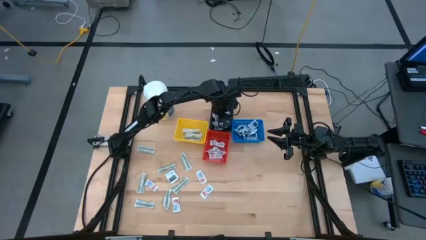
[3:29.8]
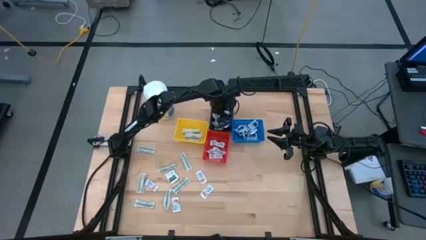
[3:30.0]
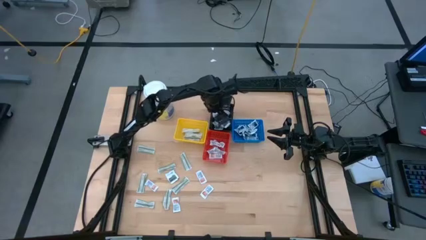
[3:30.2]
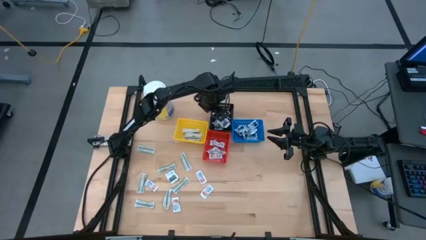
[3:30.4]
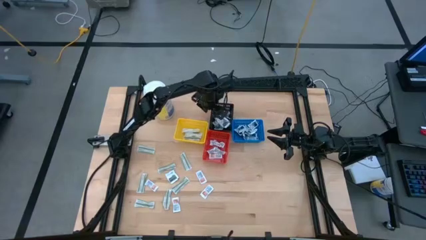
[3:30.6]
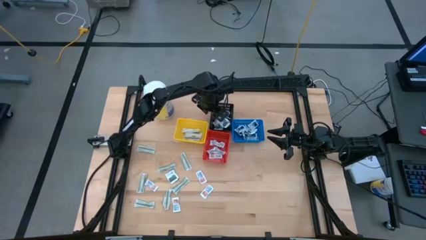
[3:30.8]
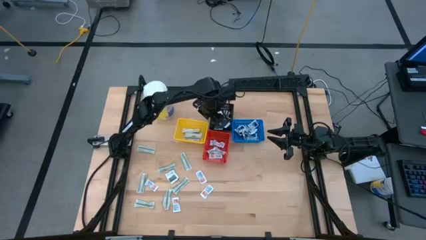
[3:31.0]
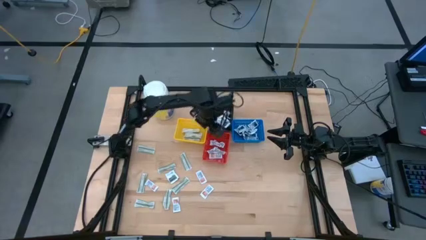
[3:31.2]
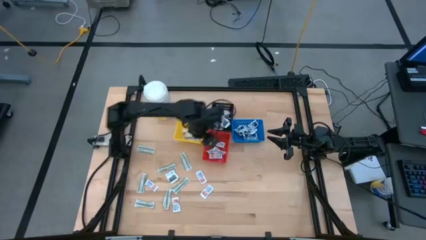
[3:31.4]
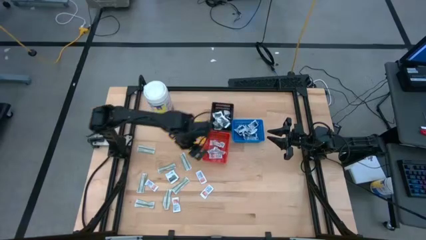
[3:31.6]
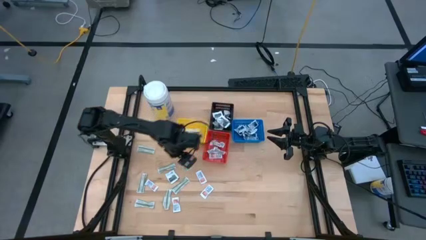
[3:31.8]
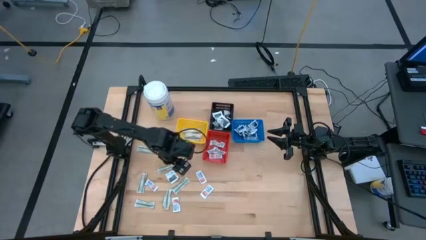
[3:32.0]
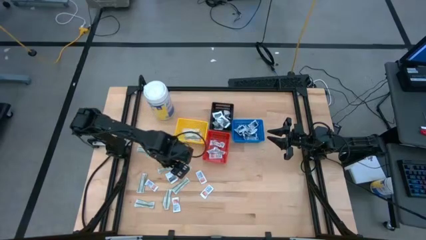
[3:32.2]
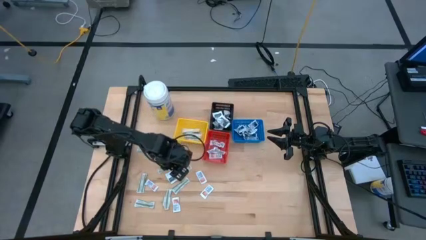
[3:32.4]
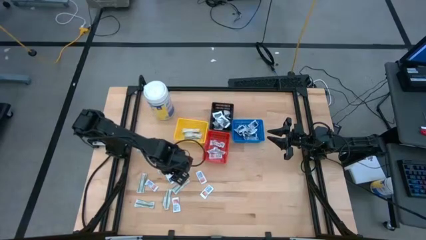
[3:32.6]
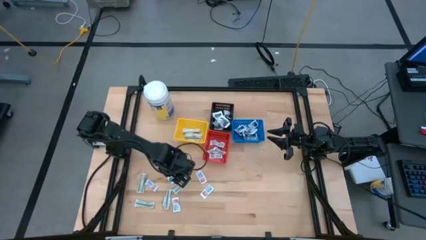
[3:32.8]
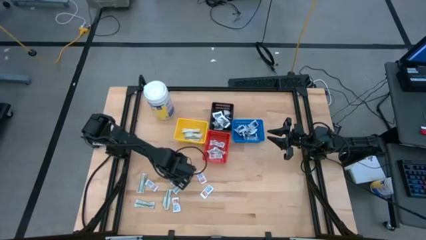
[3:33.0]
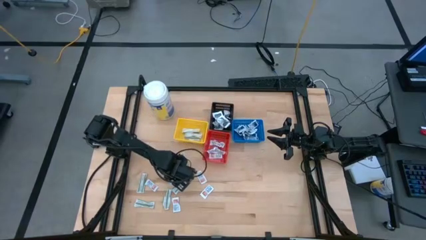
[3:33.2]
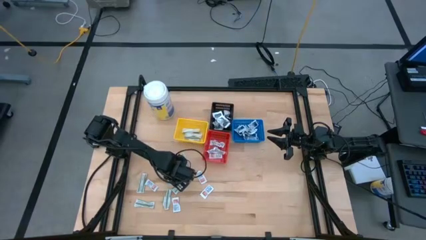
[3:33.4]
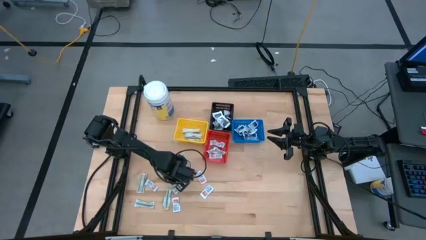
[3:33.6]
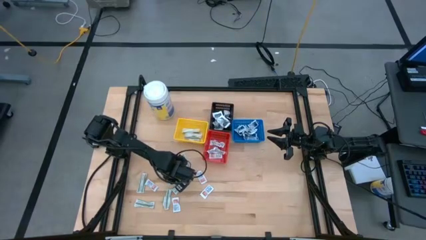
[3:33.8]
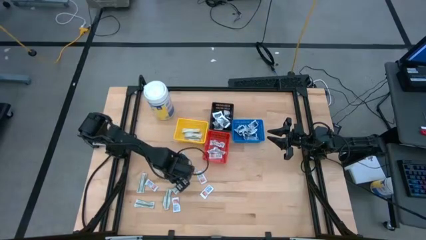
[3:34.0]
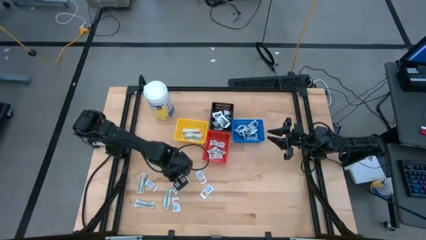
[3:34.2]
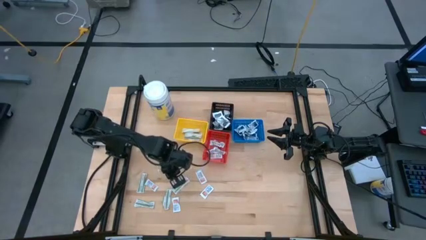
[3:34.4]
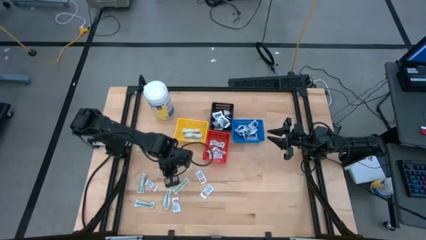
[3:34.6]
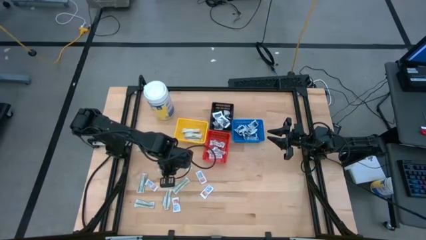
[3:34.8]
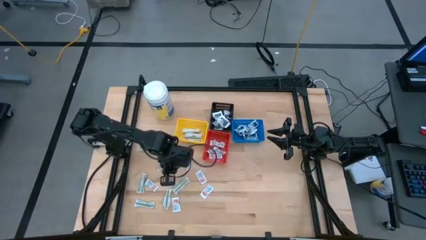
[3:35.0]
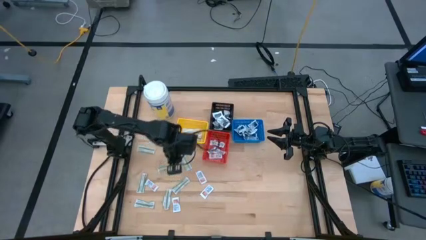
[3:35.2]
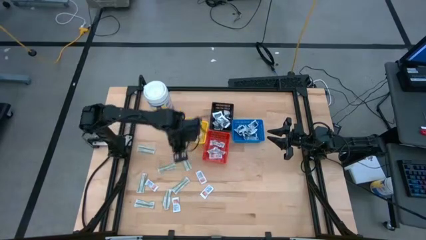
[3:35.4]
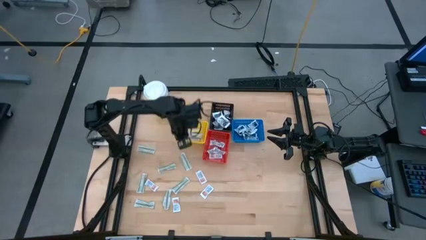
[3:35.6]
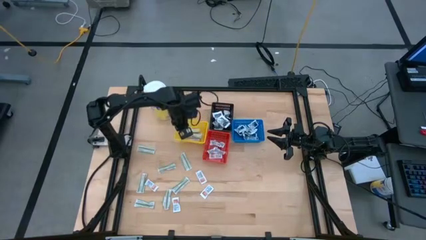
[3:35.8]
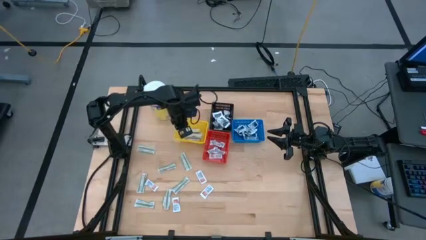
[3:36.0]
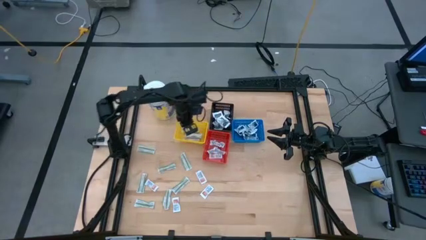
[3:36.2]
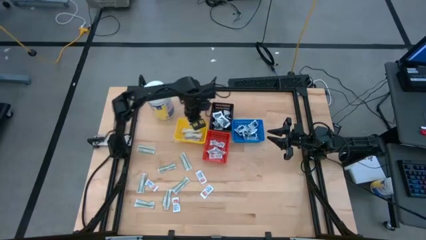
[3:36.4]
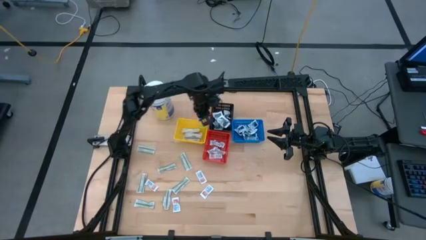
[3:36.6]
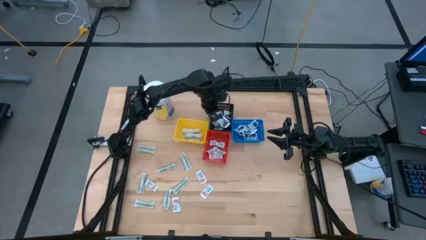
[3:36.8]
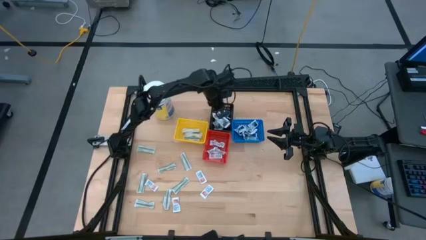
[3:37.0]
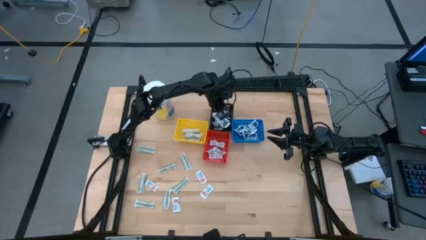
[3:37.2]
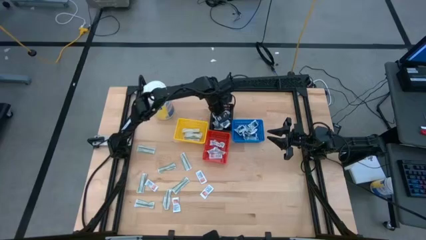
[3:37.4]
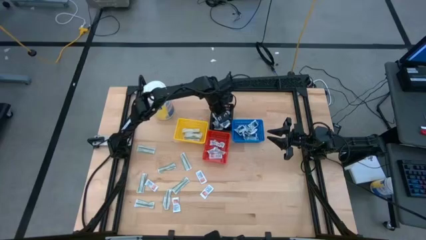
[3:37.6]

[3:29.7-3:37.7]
Task: Pick & Place First Aid Supplies
Put the towelette pack into the black bin

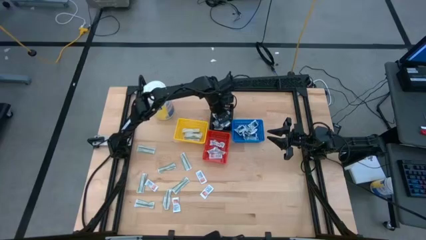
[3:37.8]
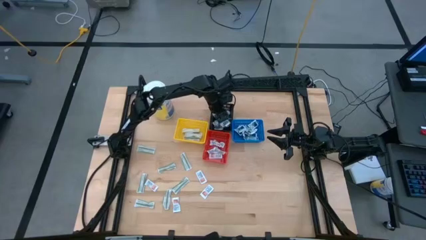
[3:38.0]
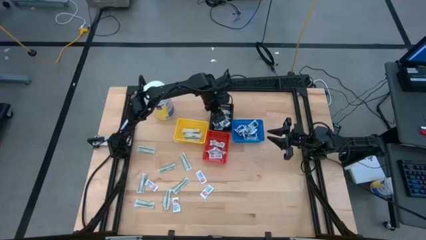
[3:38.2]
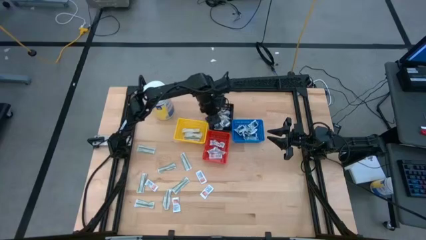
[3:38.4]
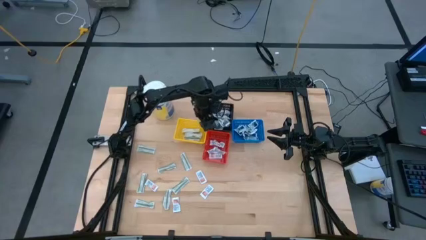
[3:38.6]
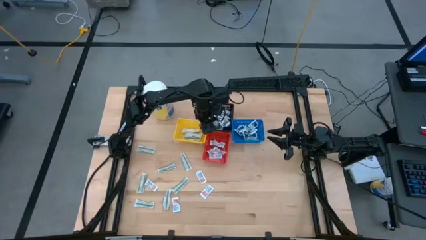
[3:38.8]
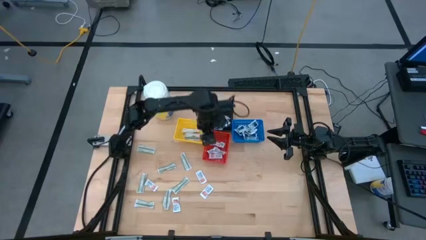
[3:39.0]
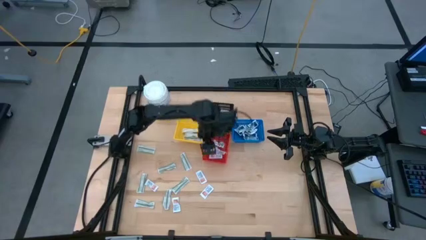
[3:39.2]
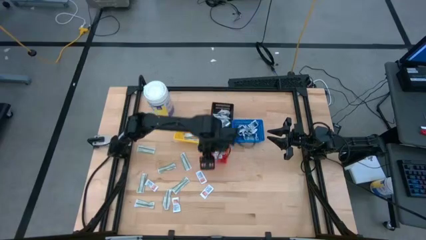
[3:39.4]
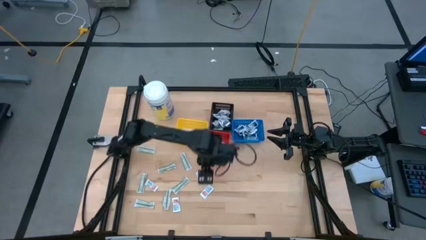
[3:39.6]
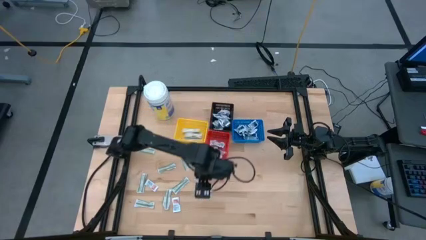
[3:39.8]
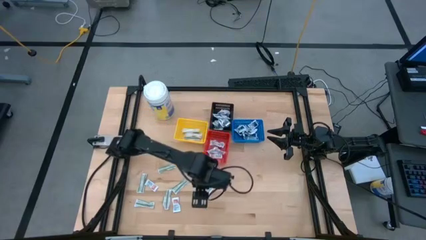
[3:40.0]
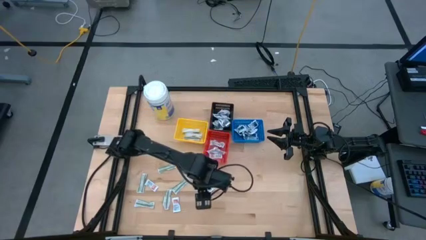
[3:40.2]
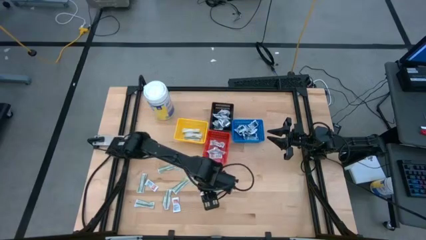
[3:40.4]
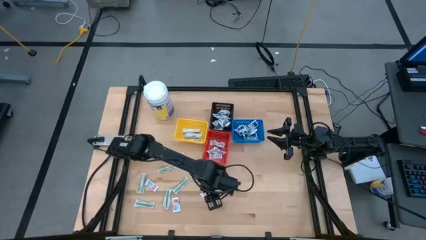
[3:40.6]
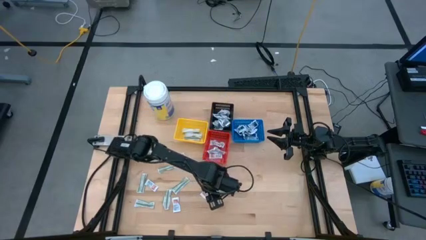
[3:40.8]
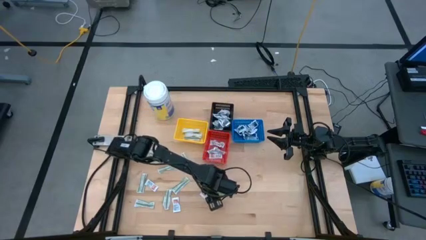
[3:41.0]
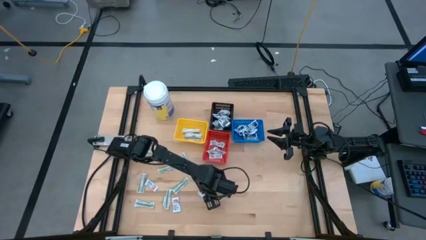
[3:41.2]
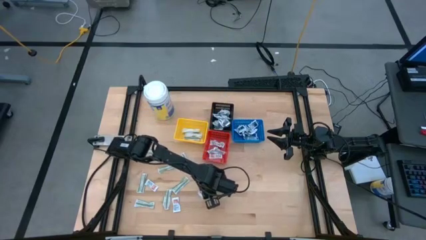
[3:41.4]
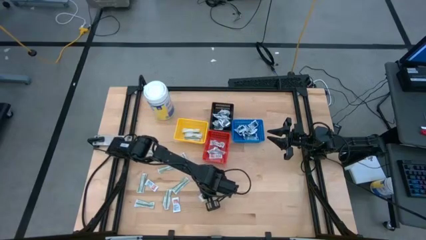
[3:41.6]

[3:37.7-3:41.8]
Put the ointment pack into the red bin

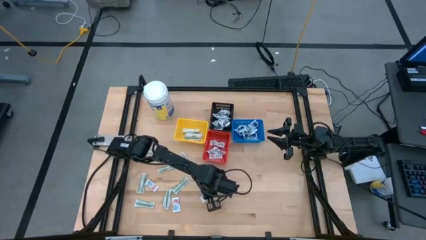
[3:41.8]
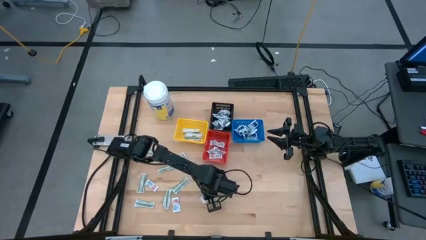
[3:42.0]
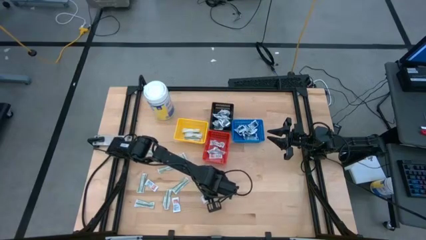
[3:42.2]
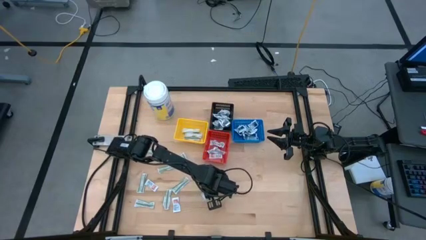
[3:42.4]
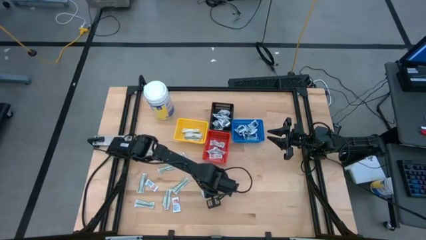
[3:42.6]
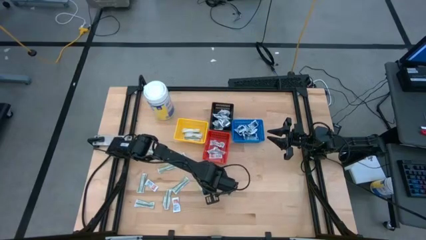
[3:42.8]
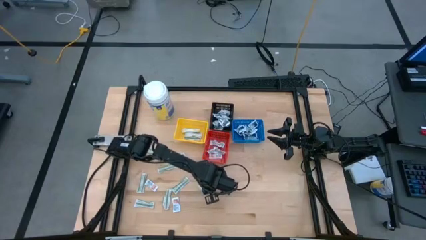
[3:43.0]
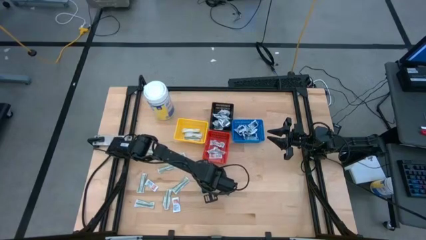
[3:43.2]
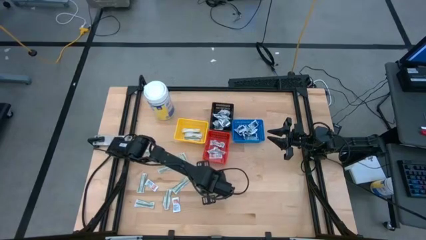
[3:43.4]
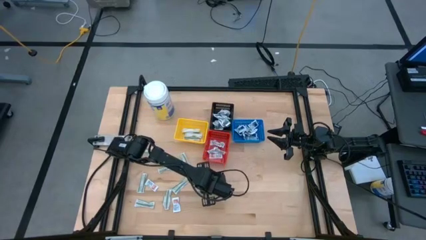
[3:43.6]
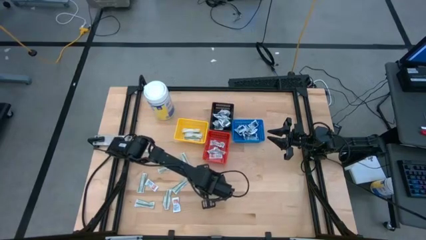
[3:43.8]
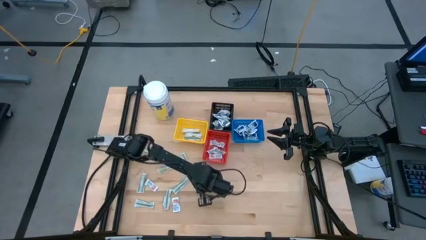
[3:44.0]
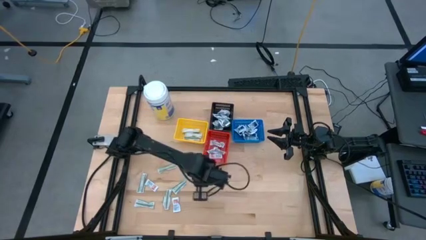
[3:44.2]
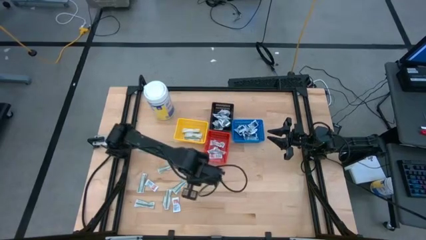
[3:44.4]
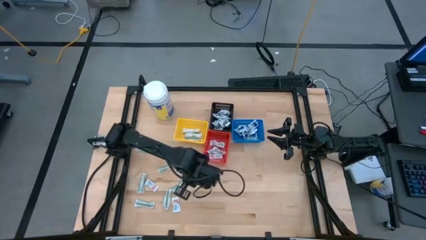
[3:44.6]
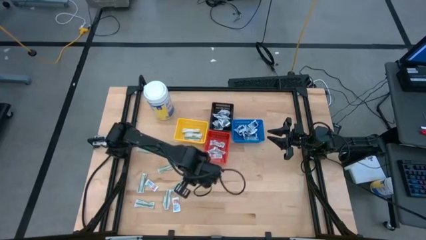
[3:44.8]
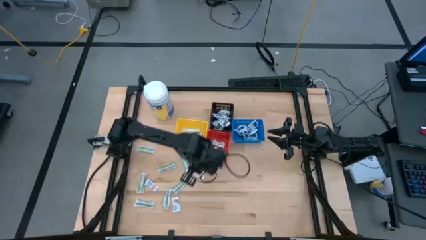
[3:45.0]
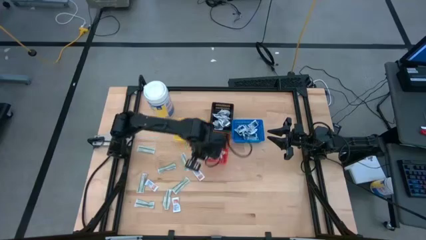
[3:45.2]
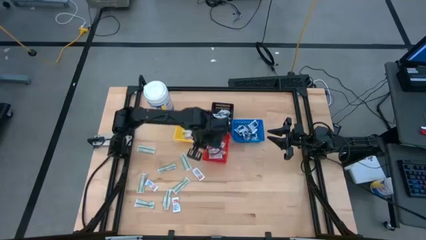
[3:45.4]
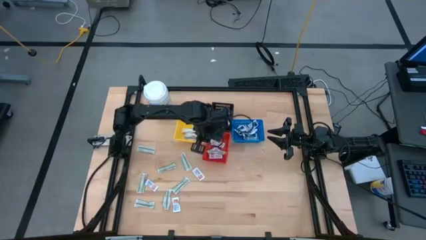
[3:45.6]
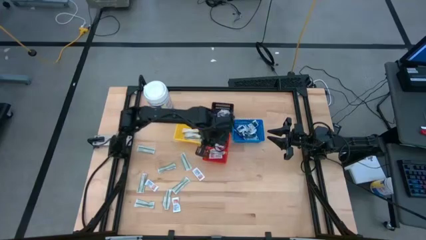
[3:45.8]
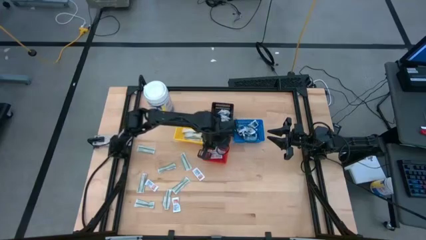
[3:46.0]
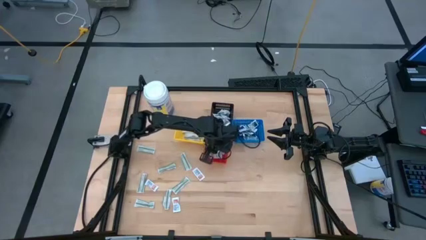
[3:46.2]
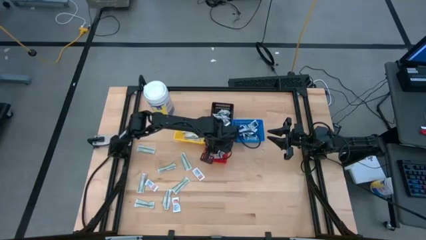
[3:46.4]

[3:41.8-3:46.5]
Put the ointment pack into the red bin
